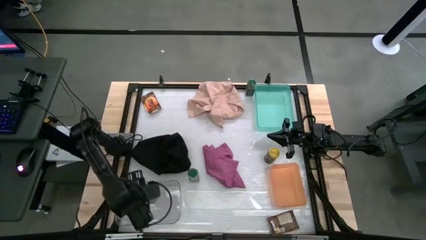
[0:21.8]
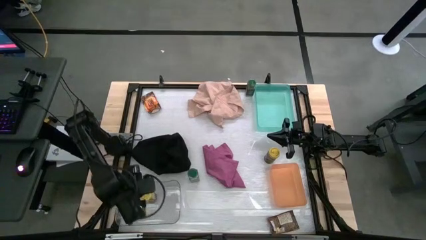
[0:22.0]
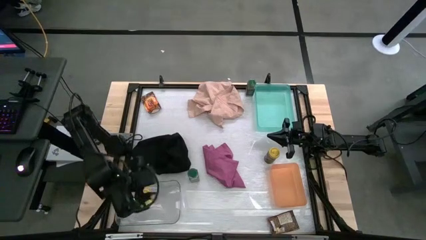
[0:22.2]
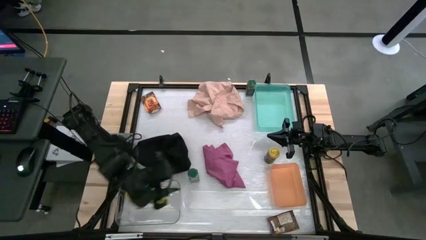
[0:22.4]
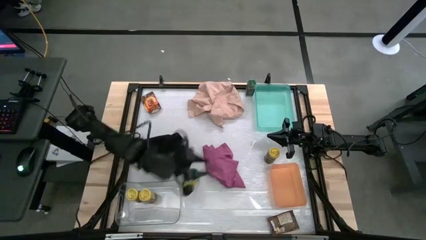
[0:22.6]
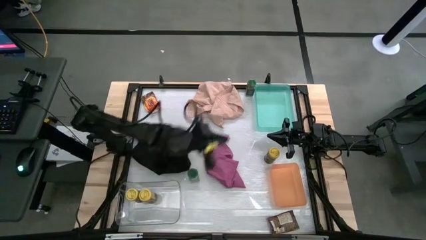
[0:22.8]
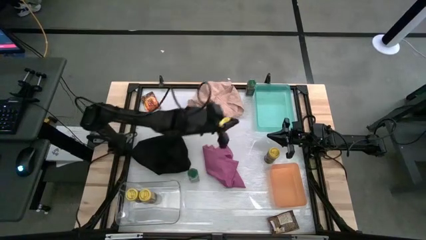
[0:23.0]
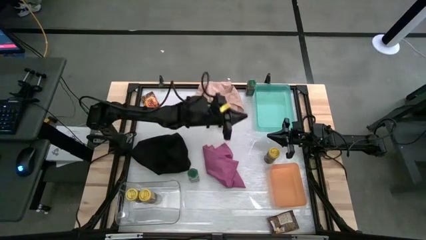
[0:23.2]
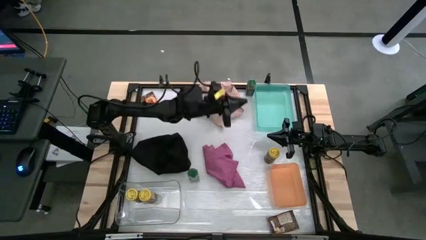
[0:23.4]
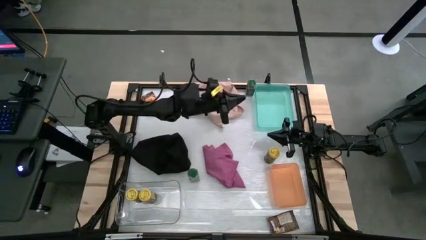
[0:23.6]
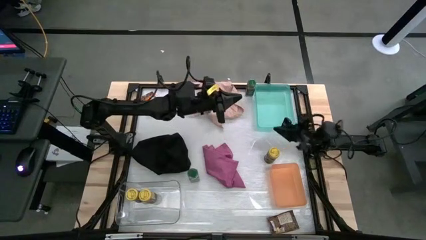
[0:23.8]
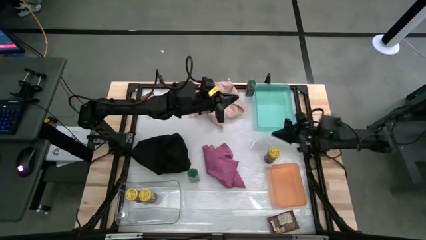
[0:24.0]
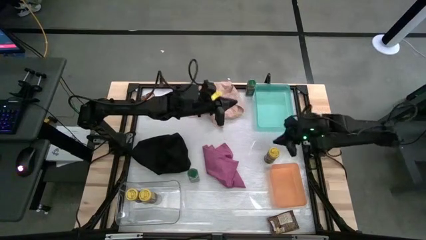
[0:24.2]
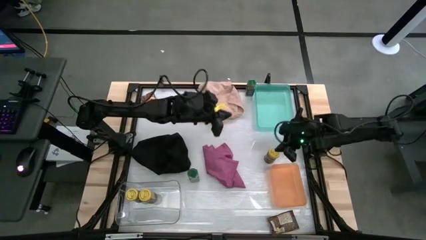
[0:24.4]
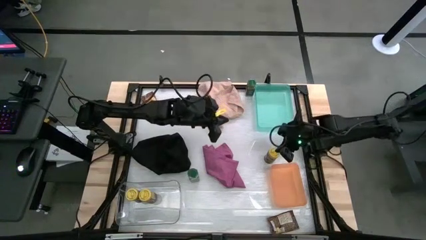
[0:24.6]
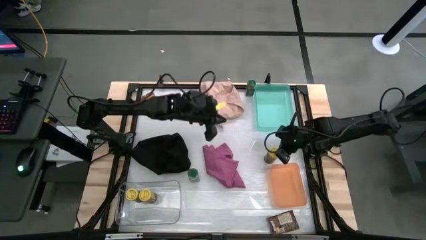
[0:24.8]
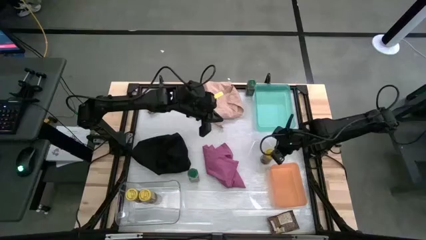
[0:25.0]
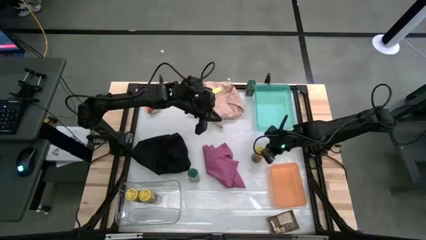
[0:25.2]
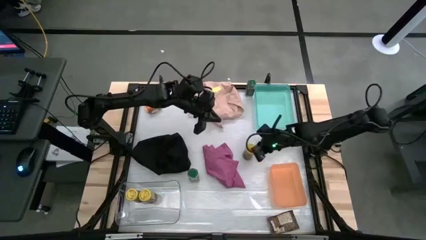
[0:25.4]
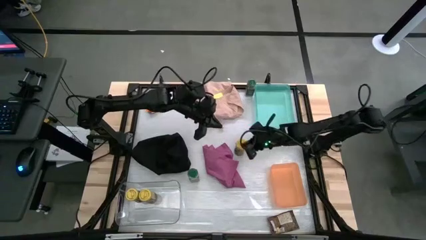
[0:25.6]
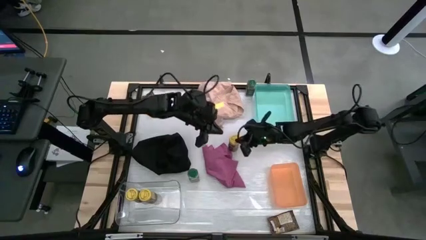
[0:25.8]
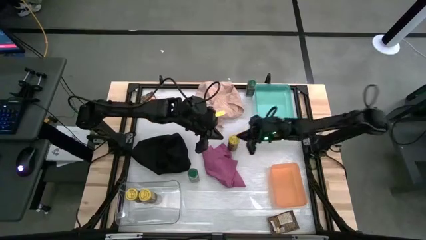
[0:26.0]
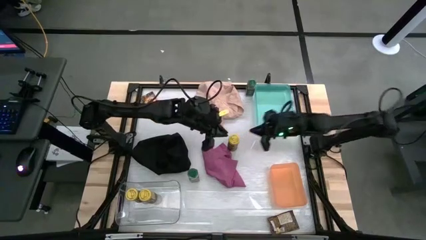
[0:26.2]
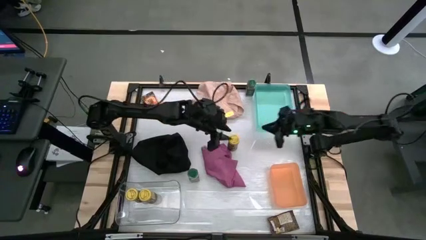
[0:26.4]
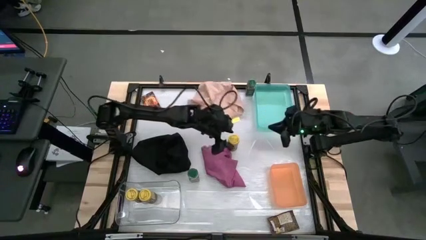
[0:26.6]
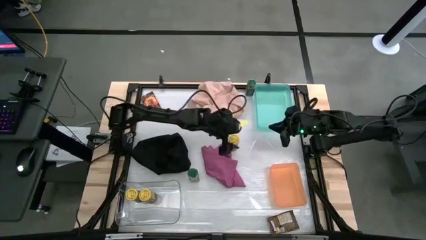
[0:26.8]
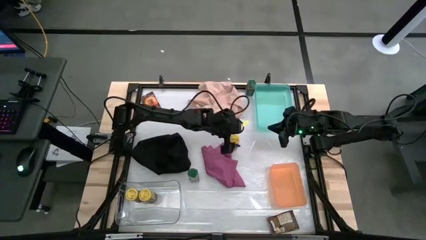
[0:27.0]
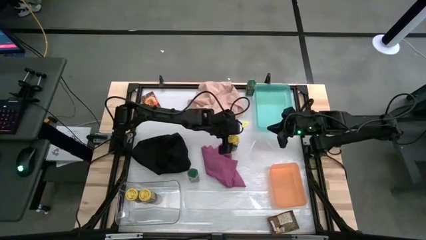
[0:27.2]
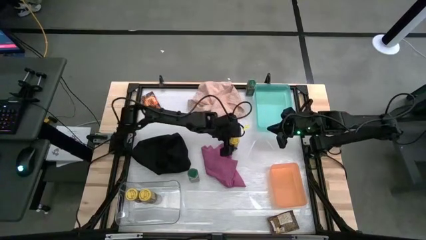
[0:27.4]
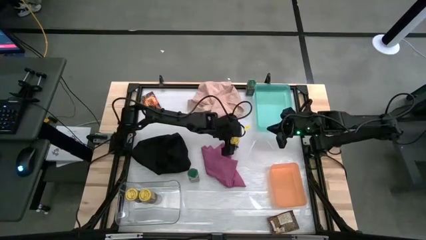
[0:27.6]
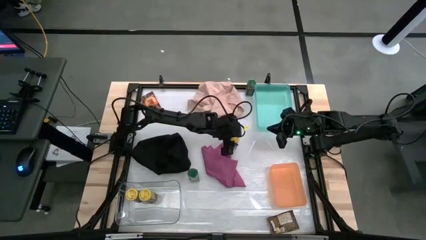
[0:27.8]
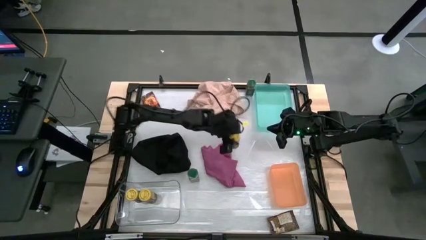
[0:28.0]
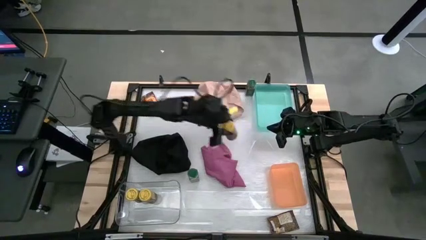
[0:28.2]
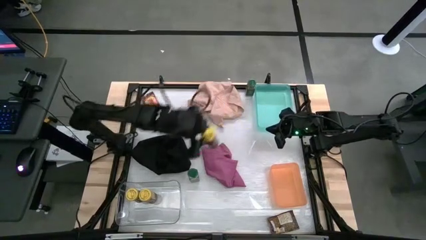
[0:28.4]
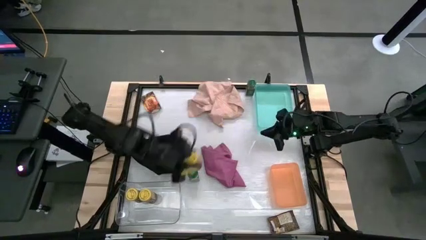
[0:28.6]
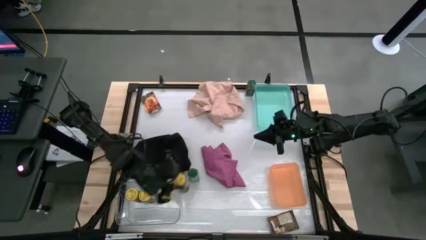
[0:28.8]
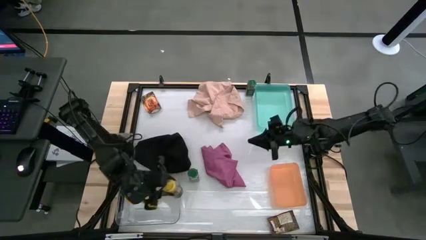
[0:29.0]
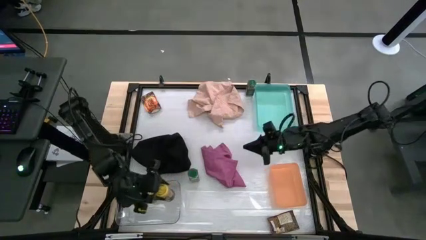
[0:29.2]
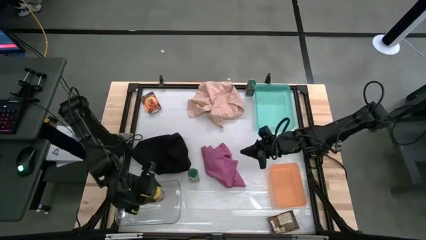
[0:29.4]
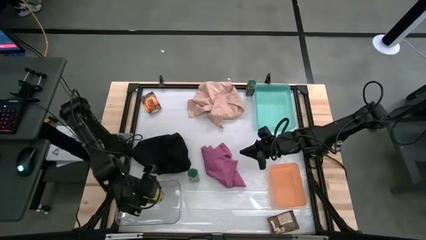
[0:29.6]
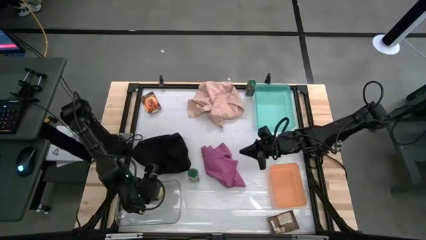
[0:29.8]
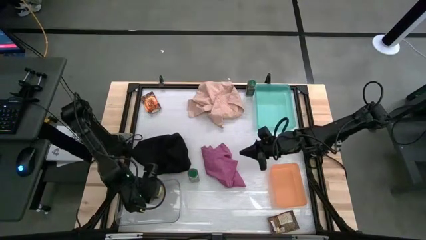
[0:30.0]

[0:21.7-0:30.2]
Task: Sort spices by type
Put the yellow seasoning bottle into the transparent bin

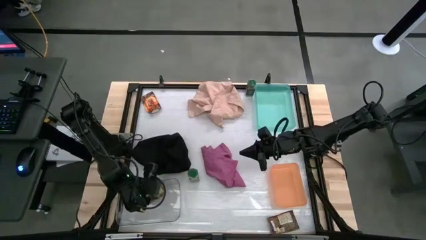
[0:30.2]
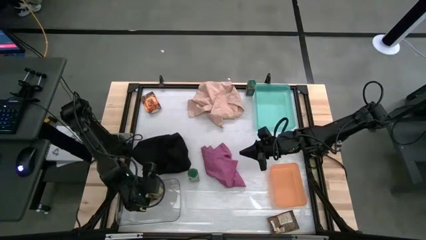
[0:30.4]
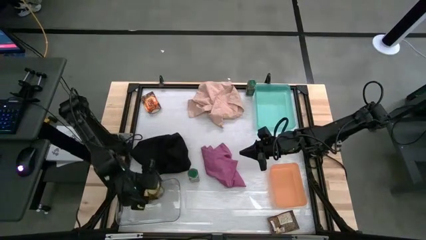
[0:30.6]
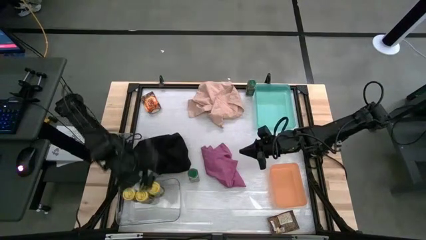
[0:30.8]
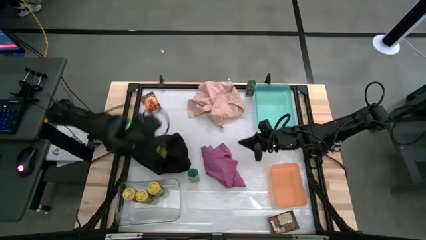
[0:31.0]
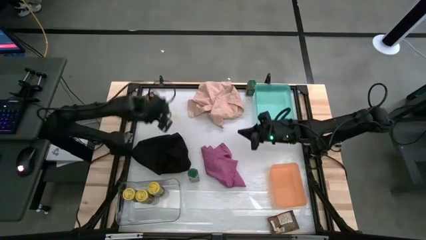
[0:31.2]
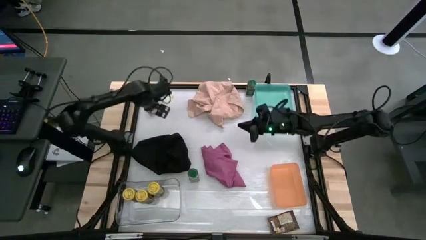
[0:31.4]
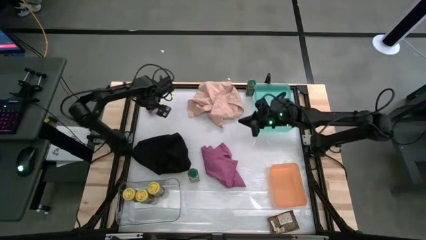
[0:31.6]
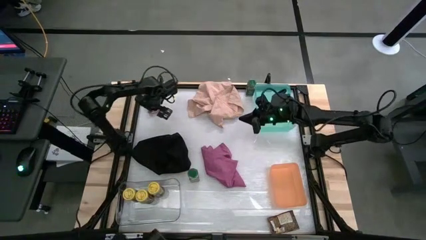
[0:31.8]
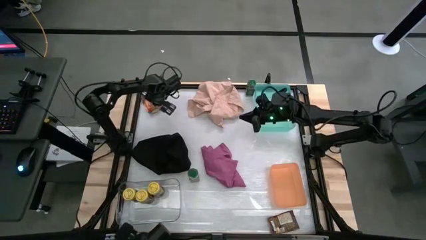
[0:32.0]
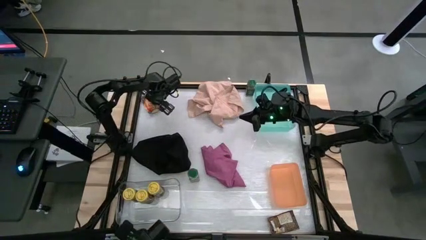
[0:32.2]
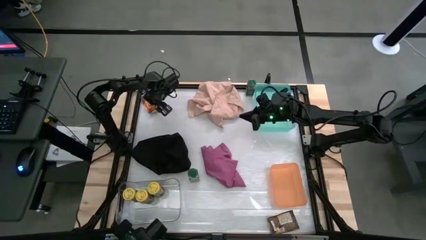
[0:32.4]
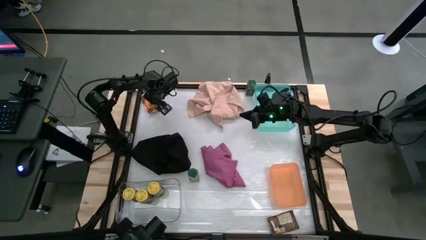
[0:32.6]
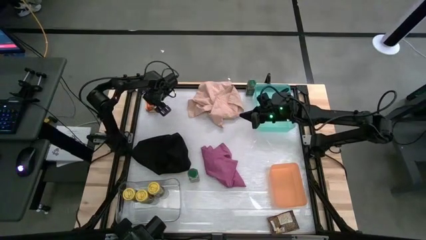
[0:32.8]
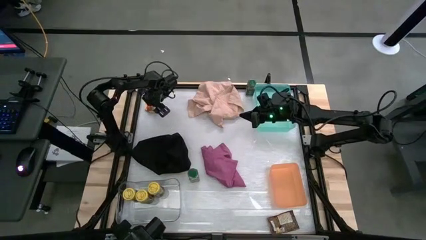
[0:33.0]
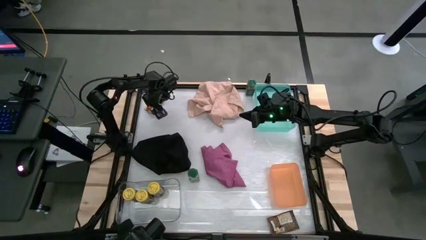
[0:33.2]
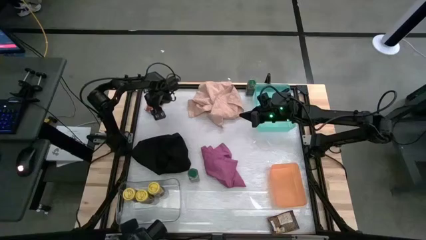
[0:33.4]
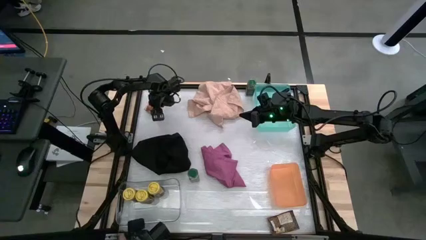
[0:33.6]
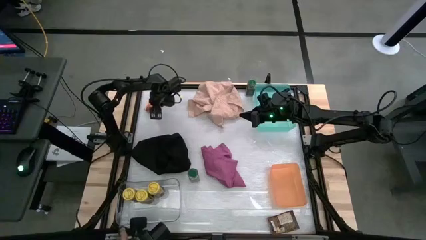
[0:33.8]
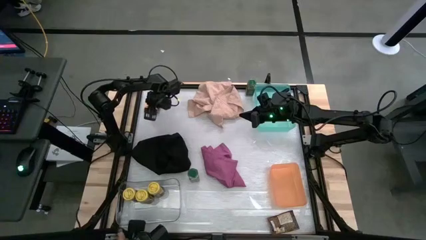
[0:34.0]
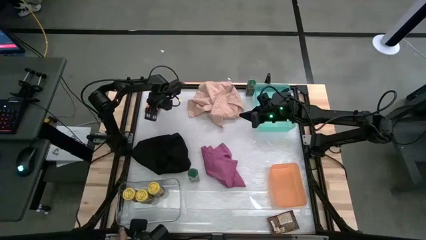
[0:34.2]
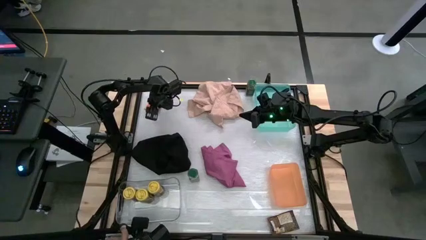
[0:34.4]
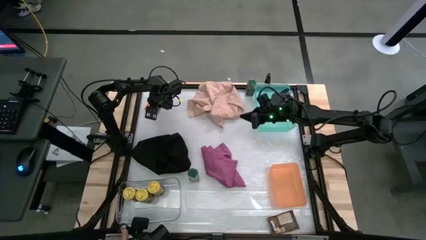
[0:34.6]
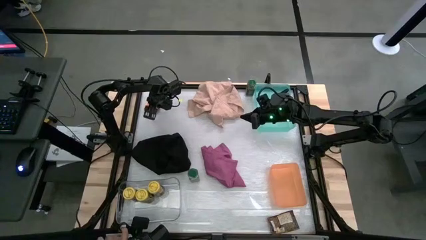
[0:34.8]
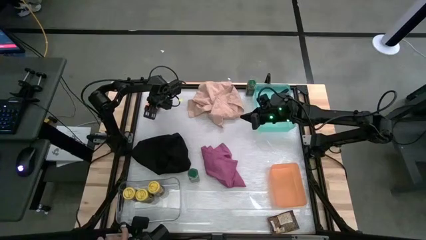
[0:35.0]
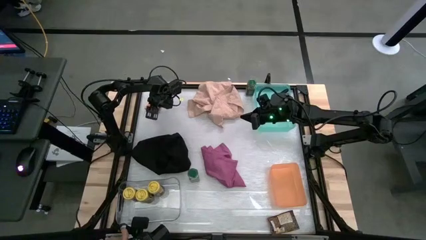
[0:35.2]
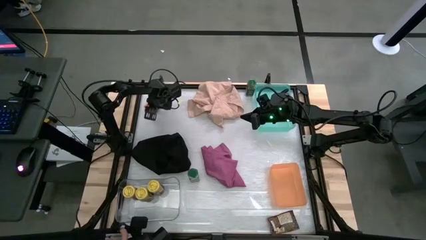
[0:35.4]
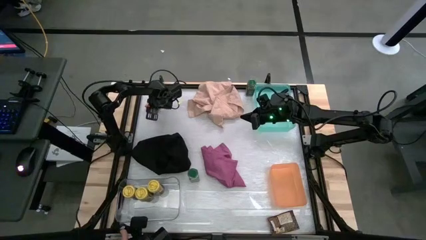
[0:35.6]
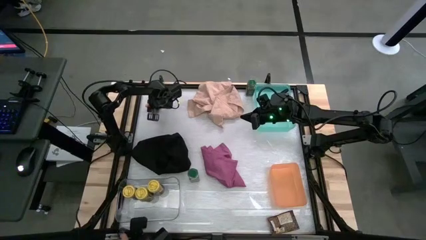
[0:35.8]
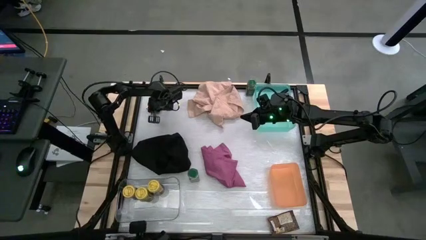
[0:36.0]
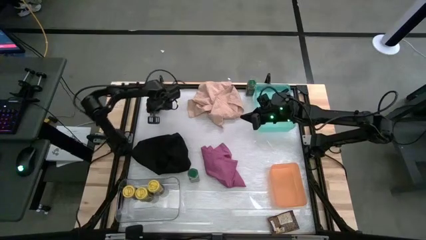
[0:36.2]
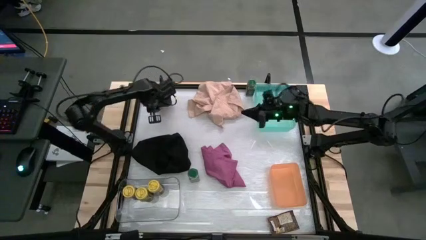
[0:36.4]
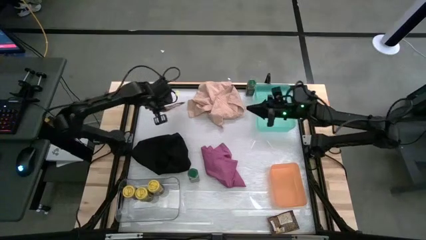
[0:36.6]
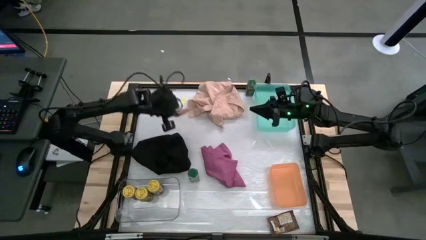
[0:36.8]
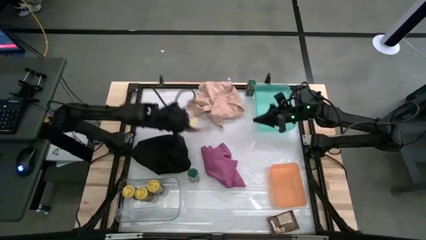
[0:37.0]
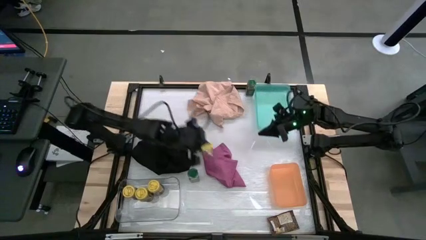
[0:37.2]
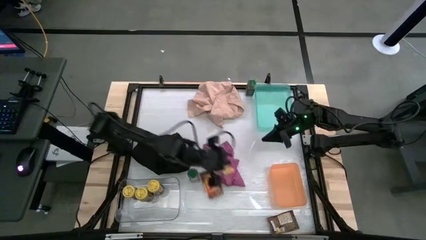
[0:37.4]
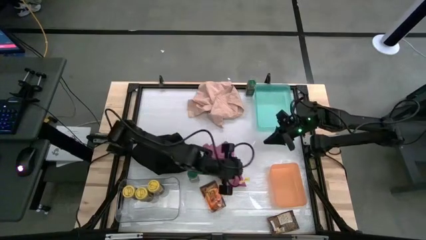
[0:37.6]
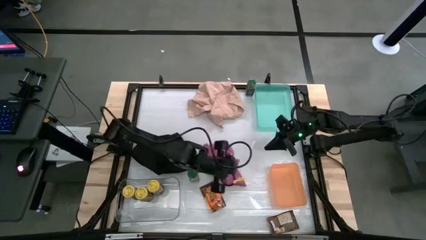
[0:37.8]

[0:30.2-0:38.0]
Put the top orange seasoning bag into the orange bin

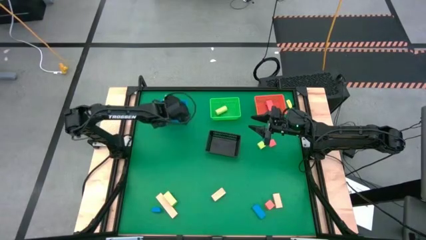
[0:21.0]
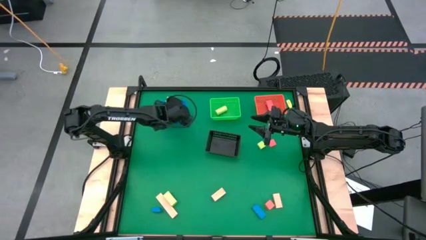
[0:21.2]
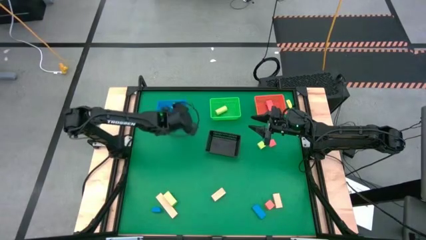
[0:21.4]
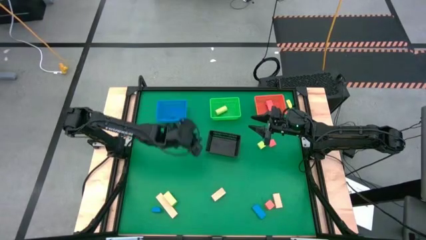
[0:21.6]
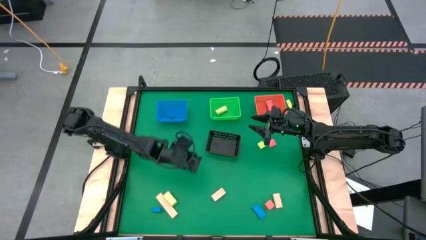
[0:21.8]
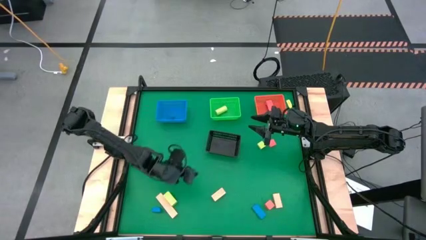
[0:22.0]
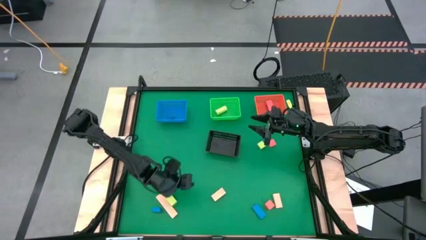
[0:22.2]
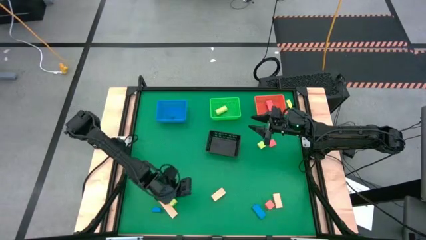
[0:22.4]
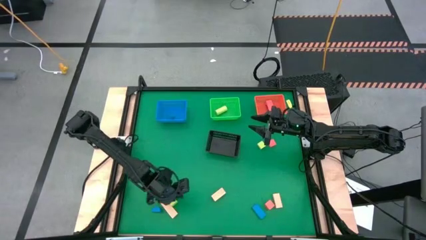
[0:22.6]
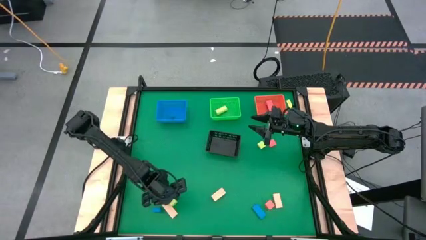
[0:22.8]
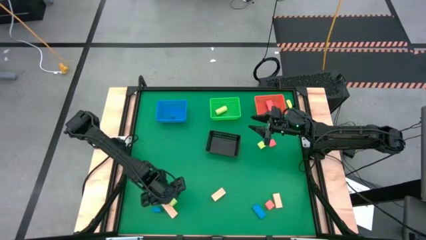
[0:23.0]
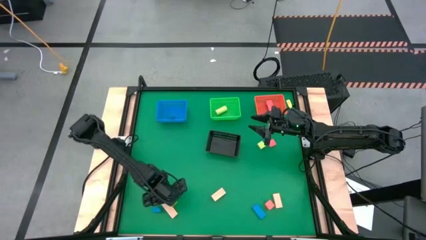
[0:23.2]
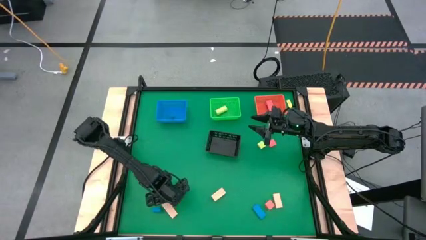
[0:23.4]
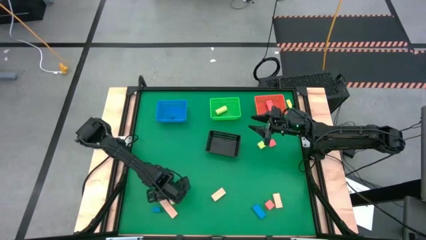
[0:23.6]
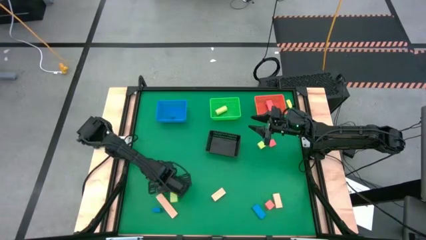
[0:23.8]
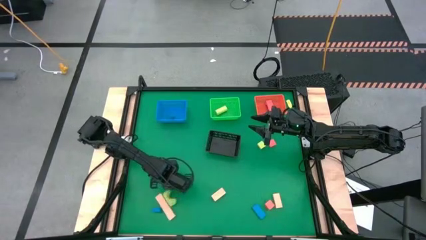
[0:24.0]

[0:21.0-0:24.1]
Task: Sort & place blocks by color
Put the bottom light green block into the green bin
